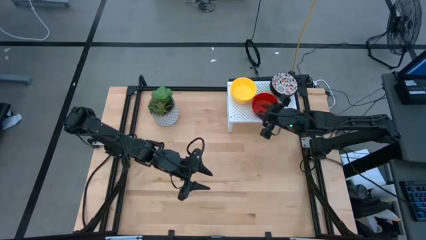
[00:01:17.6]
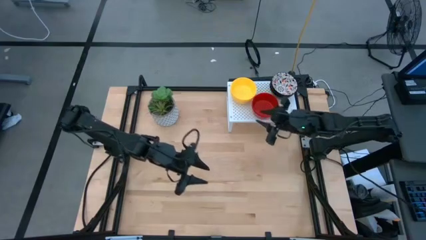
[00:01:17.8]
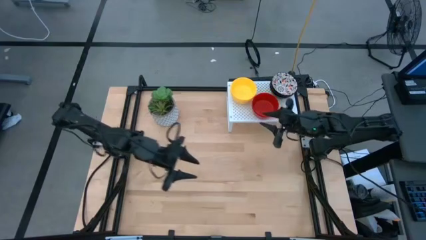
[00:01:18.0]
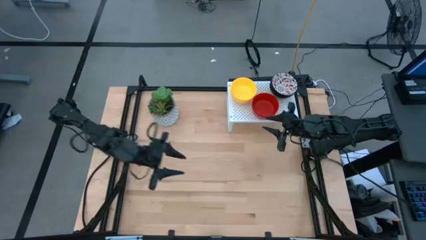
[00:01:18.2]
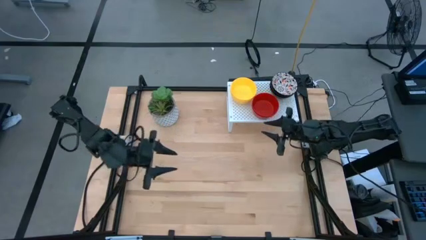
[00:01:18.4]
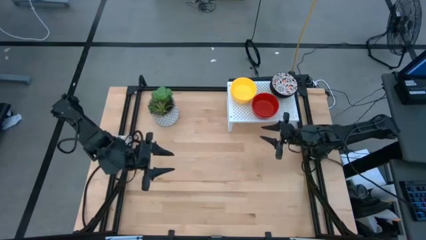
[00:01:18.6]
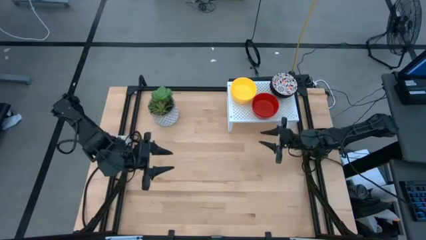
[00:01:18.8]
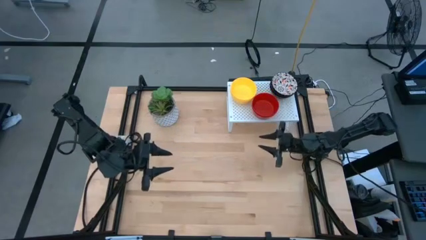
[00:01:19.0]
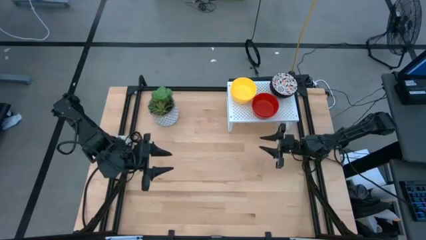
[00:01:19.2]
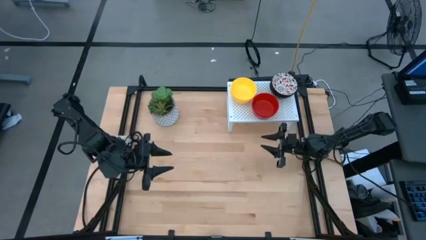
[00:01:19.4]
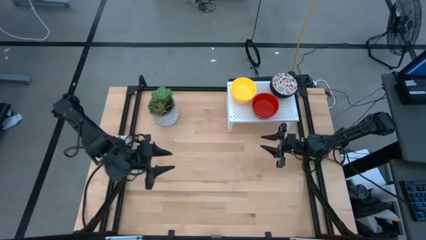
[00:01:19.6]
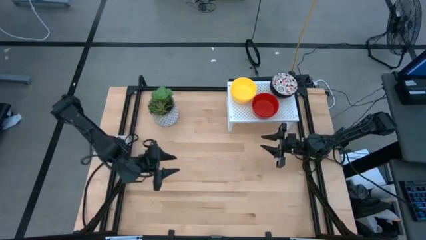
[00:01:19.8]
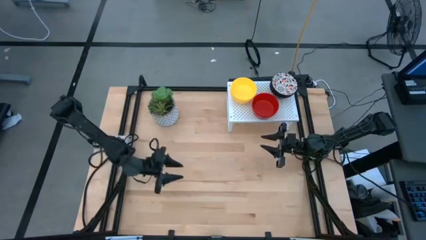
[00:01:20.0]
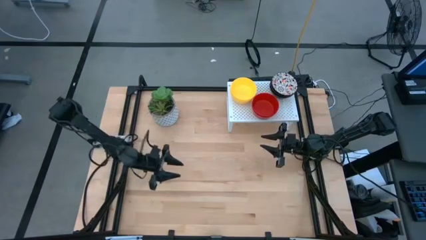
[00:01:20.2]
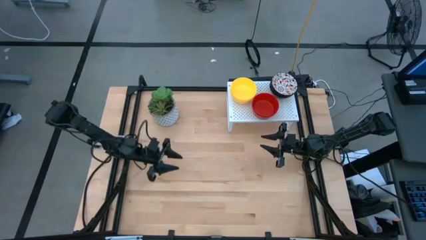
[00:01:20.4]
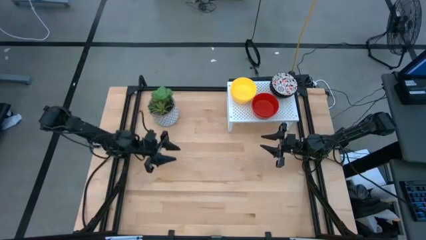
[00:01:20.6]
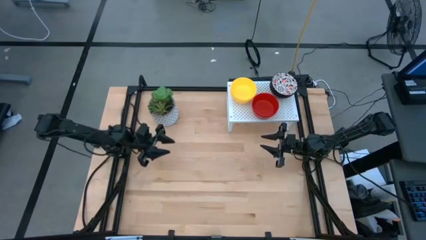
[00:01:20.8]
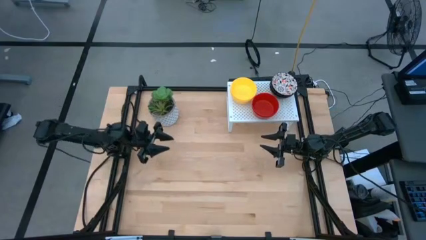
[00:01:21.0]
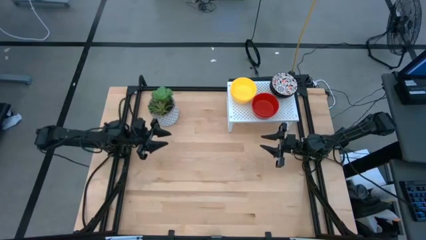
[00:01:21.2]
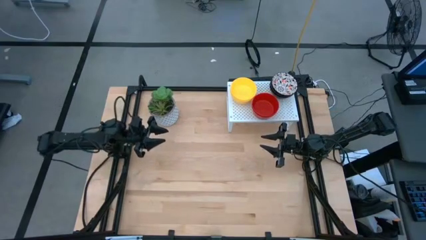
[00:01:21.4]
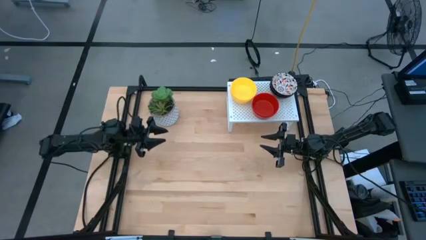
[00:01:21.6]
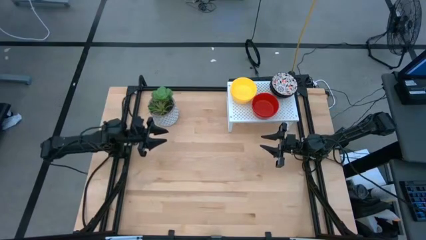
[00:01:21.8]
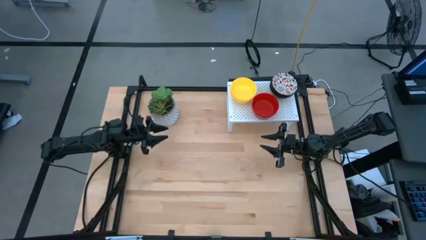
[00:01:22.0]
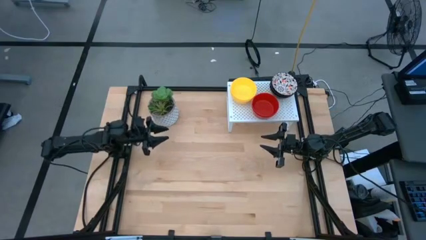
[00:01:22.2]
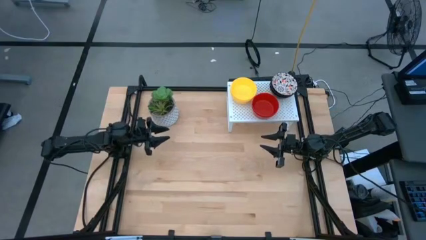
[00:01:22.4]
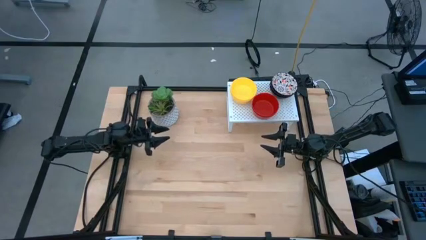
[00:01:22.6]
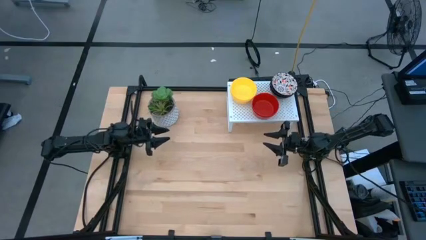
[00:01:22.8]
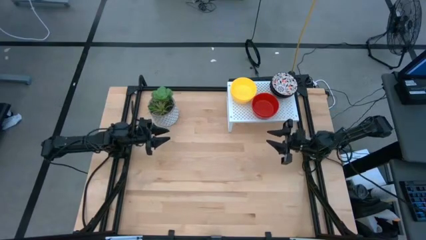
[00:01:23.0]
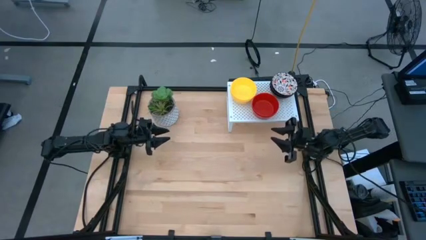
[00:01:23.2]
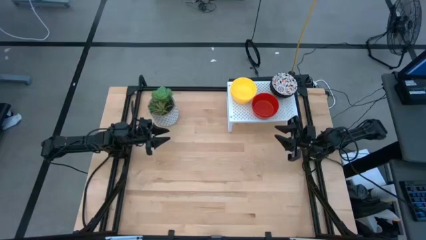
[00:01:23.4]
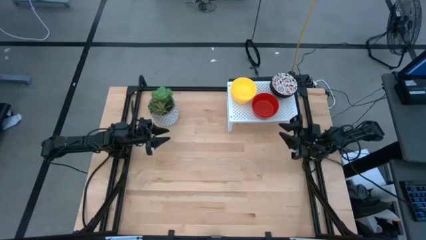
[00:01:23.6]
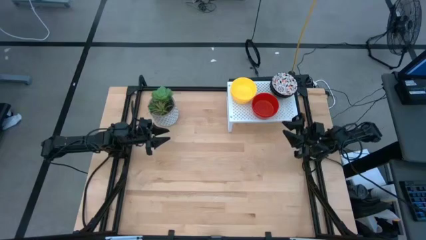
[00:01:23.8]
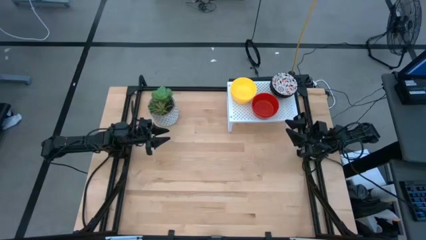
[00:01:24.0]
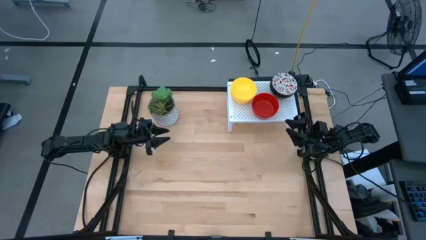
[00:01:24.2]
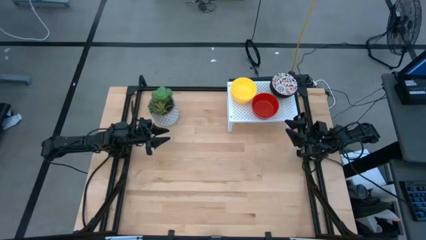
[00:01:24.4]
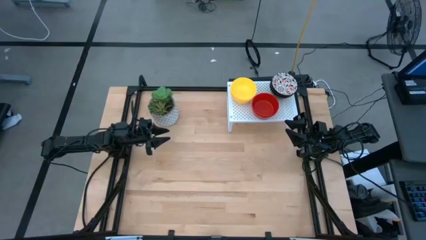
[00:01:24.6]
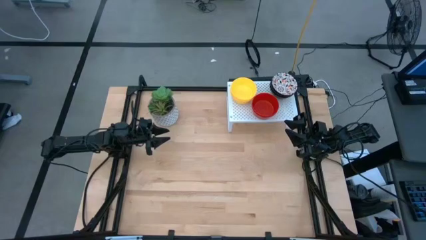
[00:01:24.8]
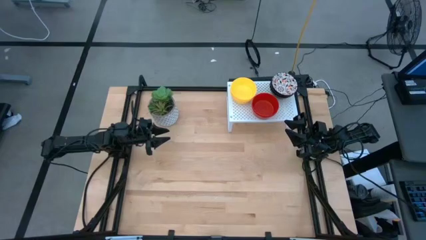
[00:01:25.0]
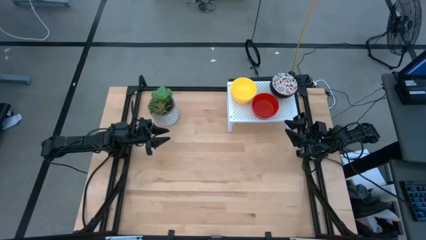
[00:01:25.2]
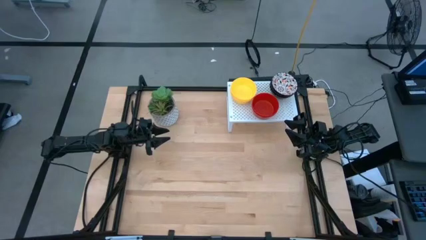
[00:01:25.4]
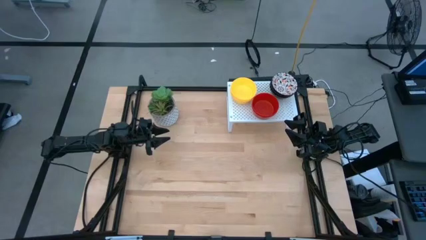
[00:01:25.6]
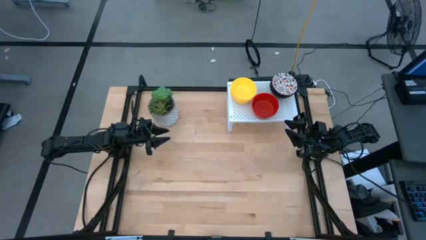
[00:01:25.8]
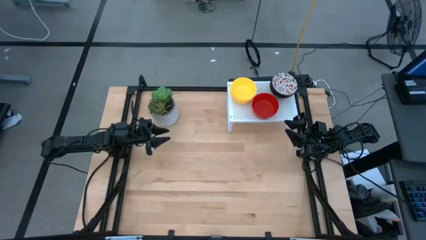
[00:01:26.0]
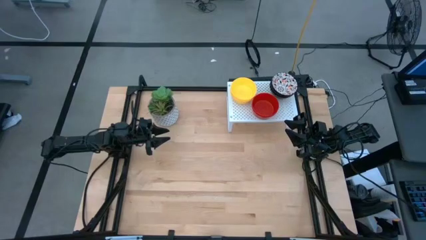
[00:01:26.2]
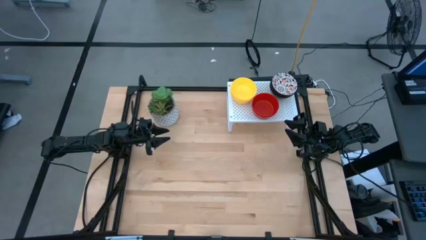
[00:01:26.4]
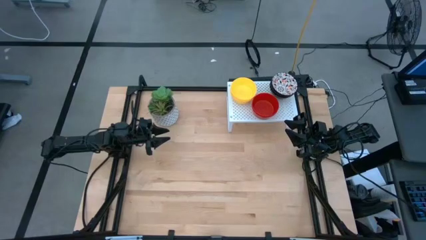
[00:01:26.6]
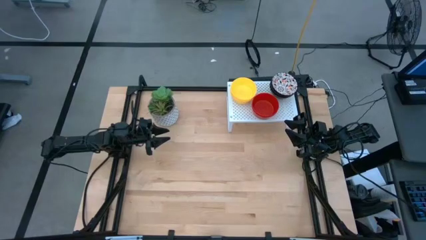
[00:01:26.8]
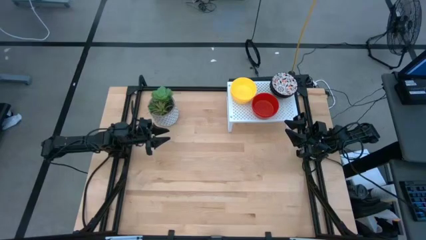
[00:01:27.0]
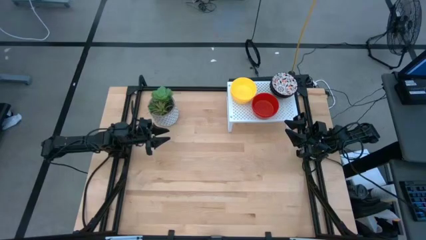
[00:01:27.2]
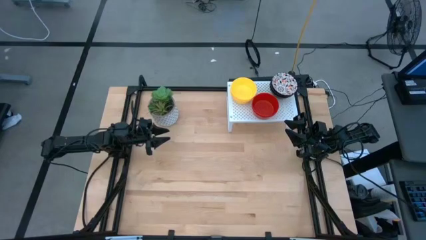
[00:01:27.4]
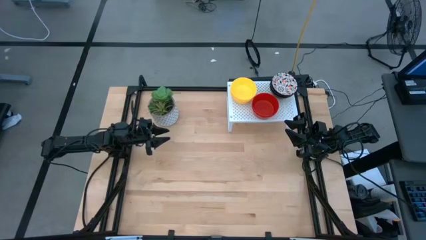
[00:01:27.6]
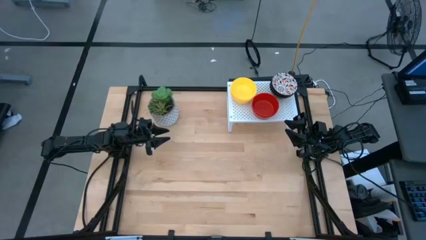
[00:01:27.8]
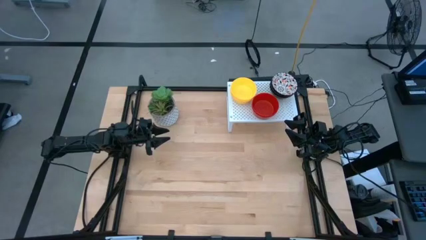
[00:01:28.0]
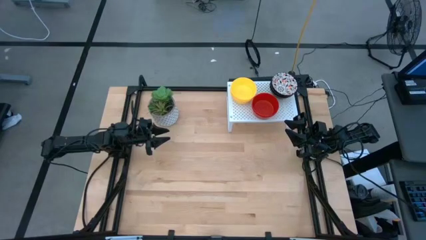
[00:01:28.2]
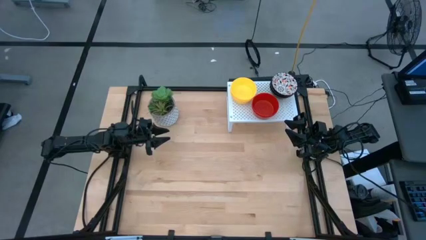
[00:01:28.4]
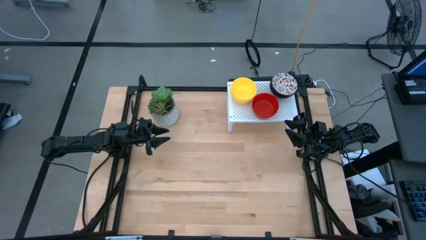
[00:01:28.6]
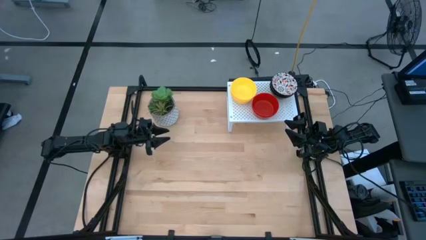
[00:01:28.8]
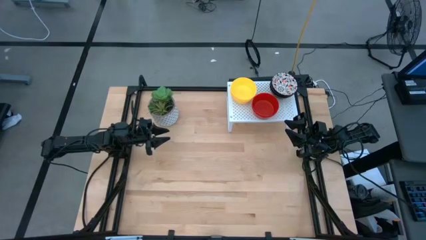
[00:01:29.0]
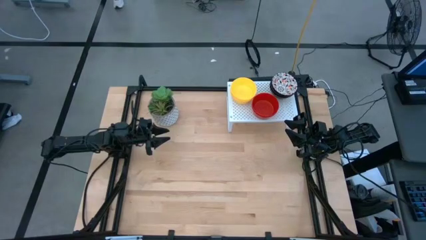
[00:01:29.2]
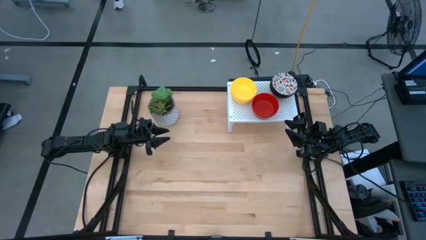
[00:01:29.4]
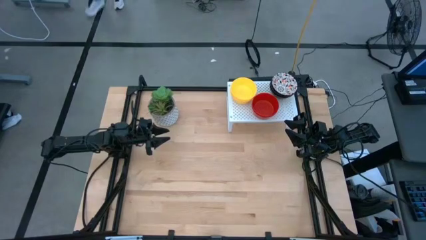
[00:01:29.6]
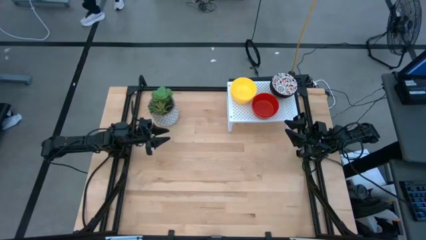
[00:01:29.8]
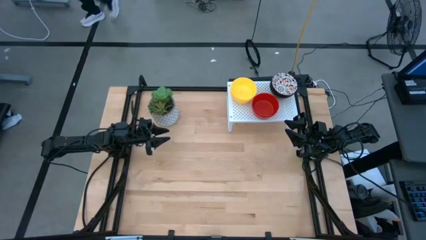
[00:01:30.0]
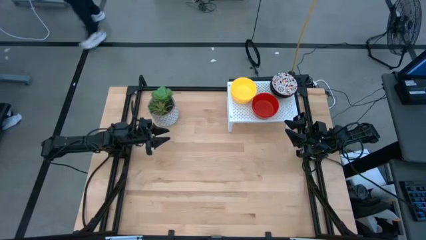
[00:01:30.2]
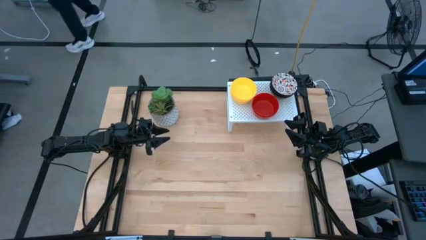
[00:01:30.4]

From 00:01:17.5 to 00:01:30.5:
Task: Pick & Place Mini bowls
Return to Home Position
